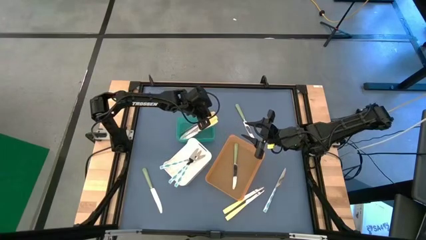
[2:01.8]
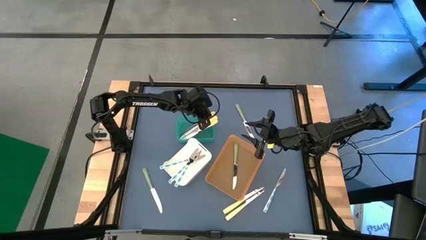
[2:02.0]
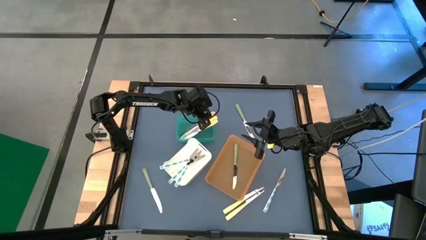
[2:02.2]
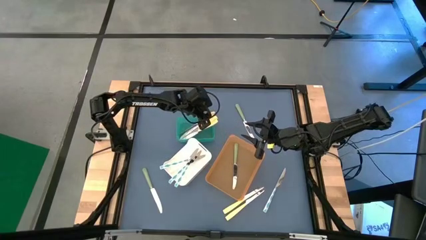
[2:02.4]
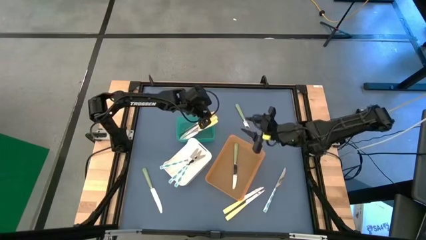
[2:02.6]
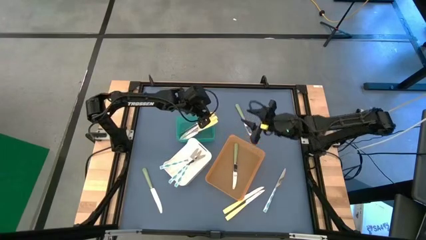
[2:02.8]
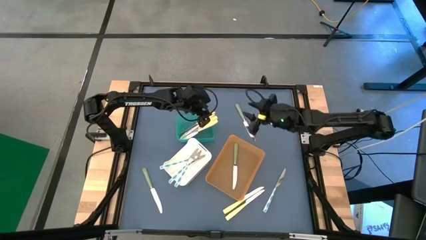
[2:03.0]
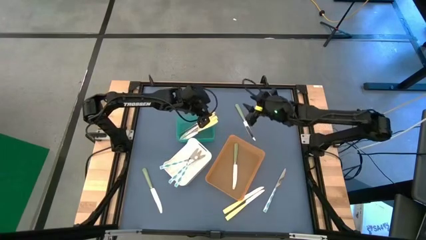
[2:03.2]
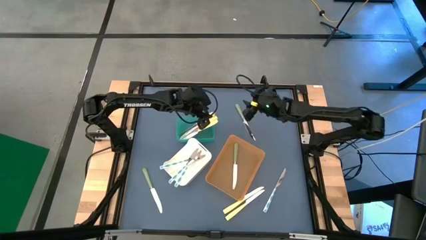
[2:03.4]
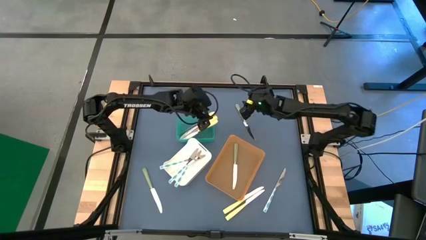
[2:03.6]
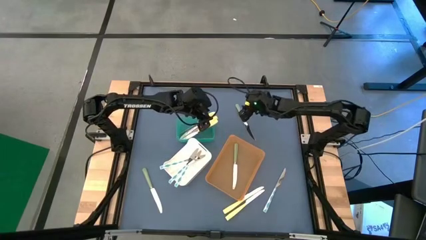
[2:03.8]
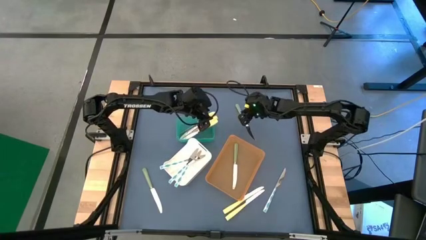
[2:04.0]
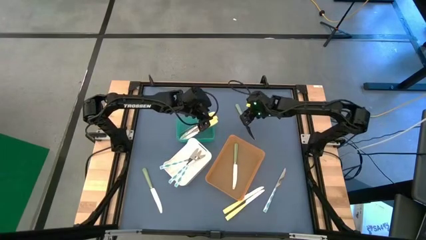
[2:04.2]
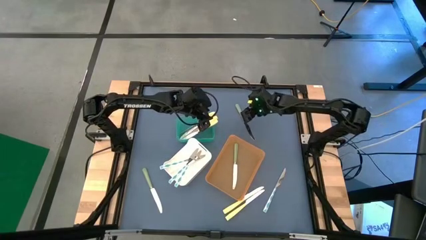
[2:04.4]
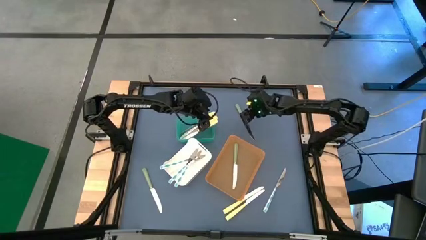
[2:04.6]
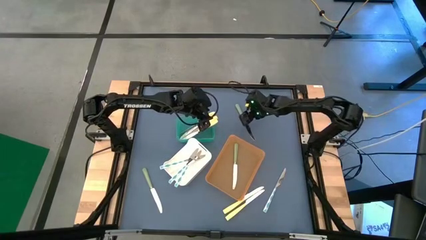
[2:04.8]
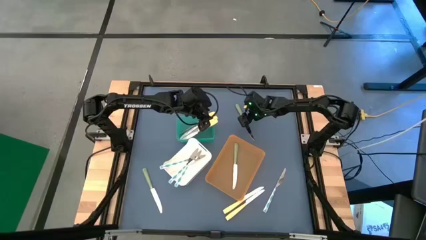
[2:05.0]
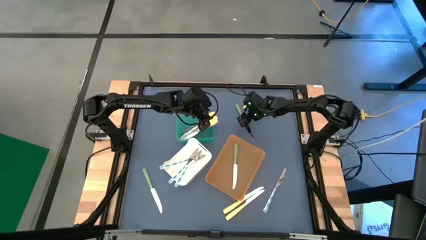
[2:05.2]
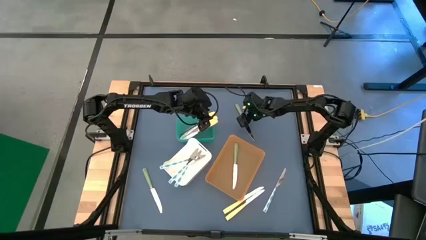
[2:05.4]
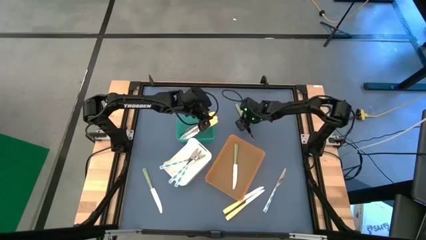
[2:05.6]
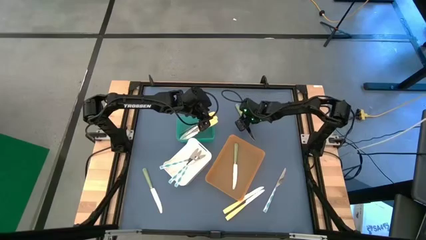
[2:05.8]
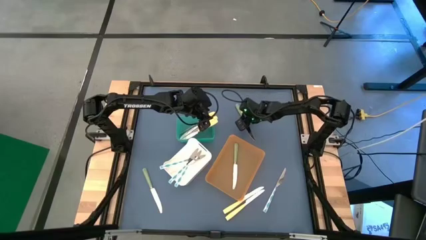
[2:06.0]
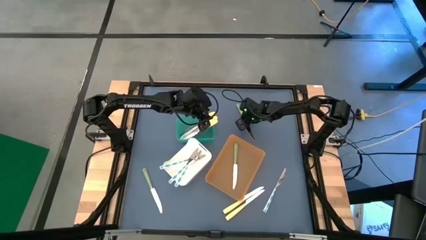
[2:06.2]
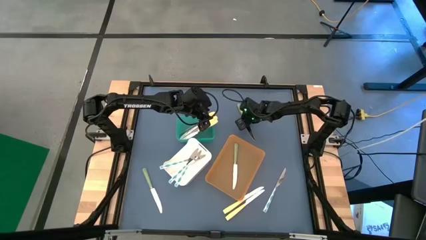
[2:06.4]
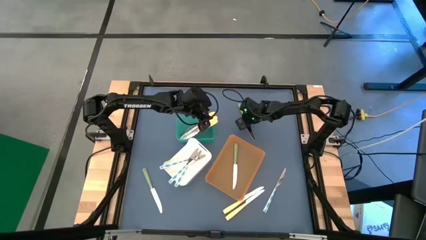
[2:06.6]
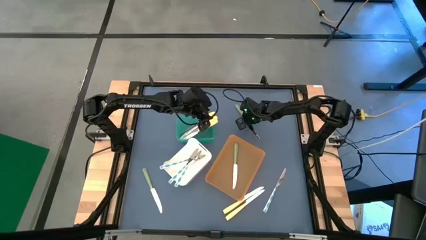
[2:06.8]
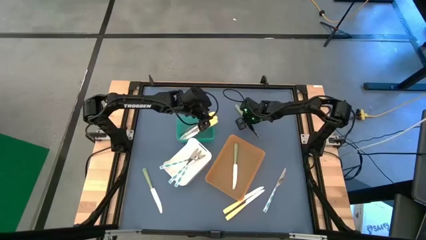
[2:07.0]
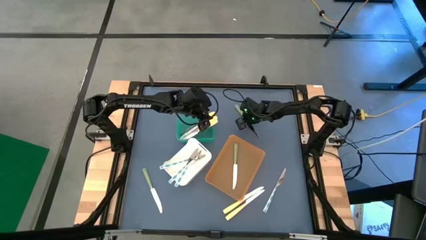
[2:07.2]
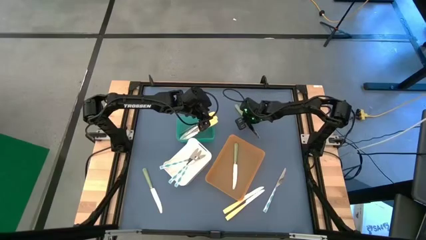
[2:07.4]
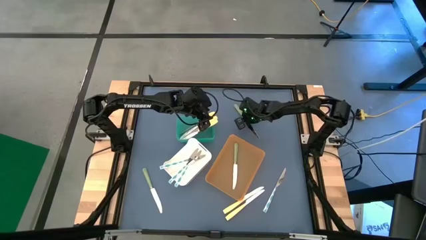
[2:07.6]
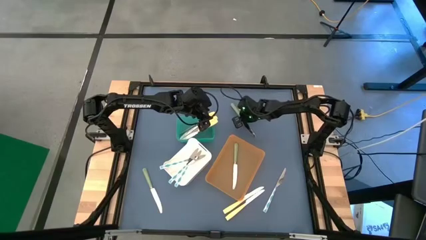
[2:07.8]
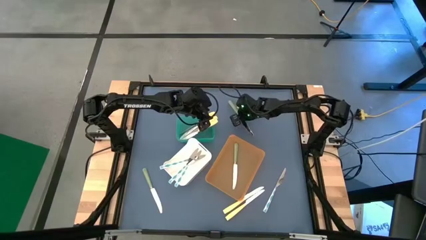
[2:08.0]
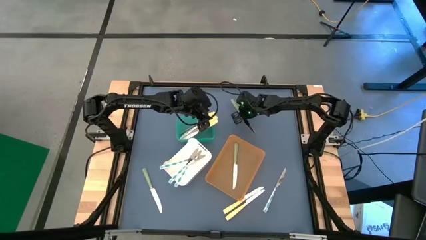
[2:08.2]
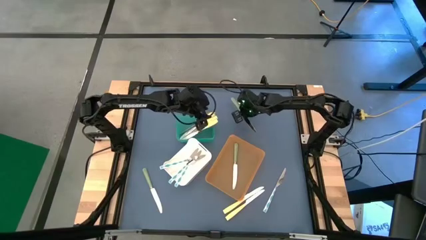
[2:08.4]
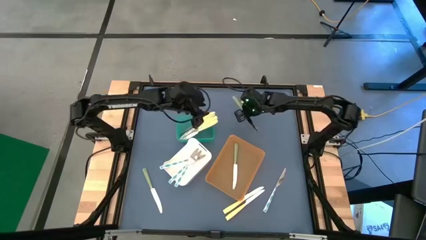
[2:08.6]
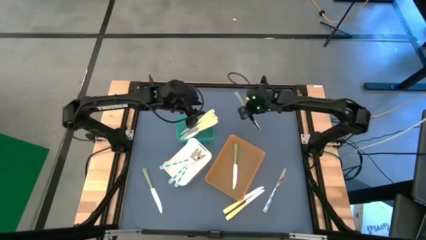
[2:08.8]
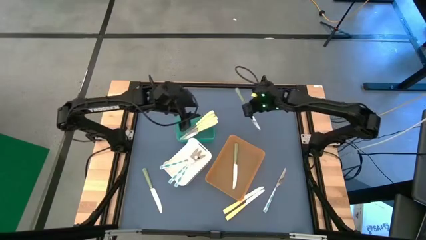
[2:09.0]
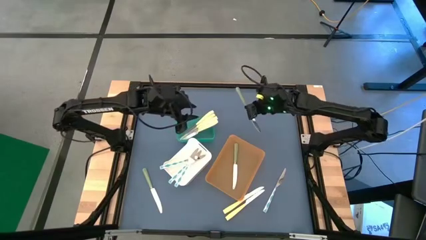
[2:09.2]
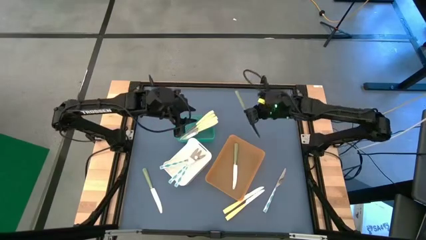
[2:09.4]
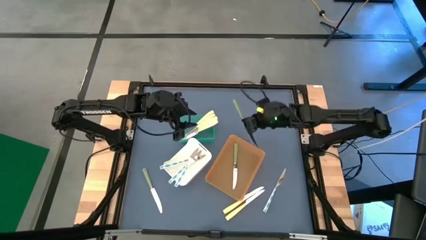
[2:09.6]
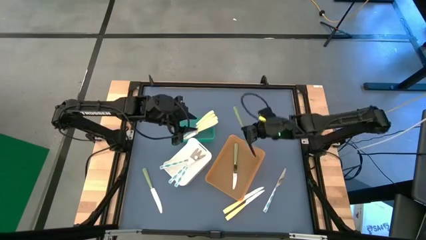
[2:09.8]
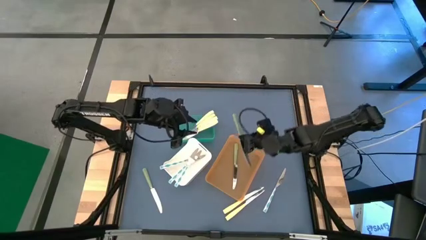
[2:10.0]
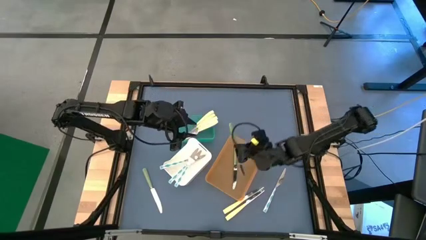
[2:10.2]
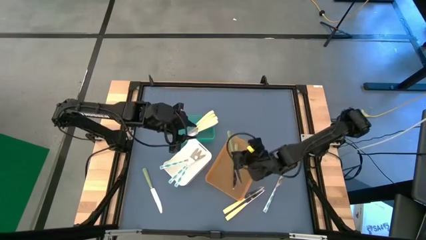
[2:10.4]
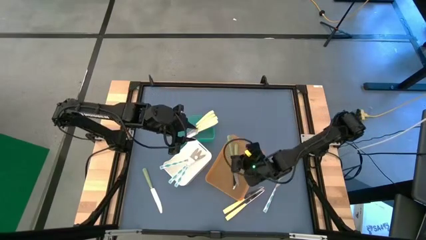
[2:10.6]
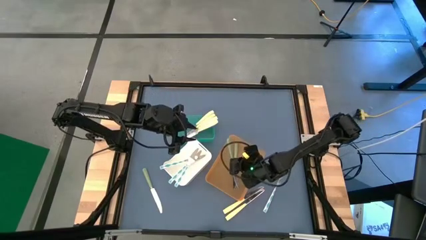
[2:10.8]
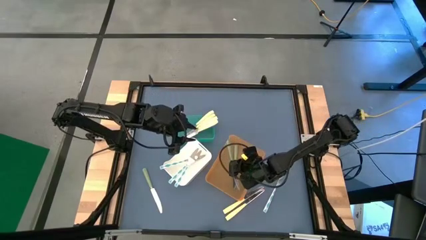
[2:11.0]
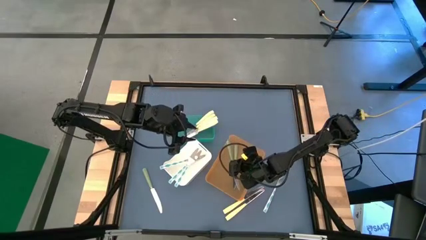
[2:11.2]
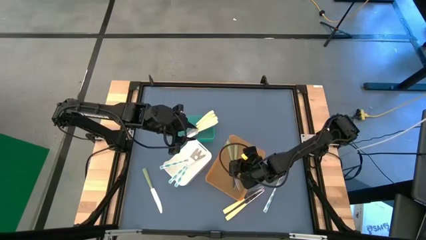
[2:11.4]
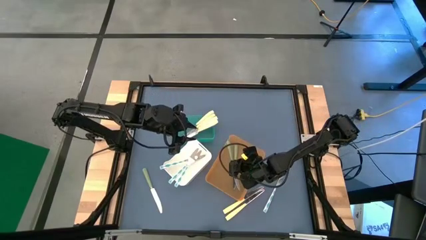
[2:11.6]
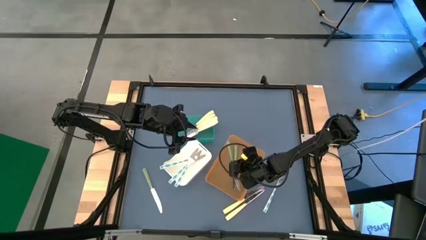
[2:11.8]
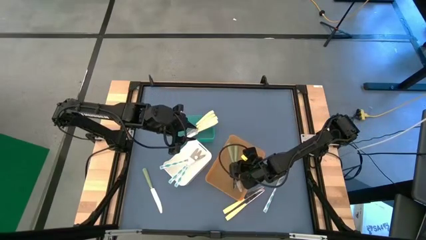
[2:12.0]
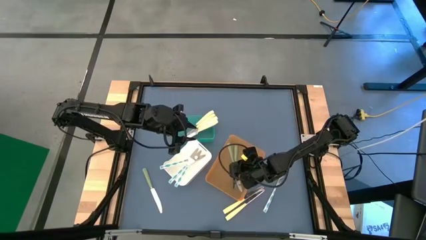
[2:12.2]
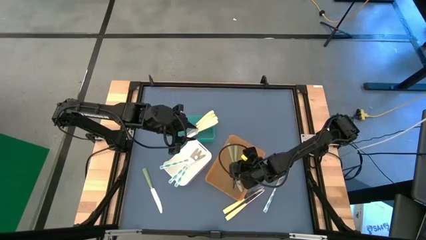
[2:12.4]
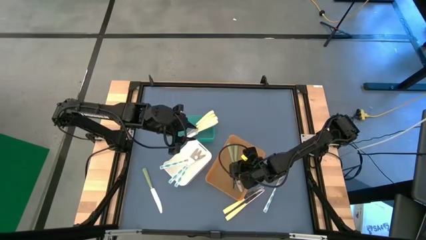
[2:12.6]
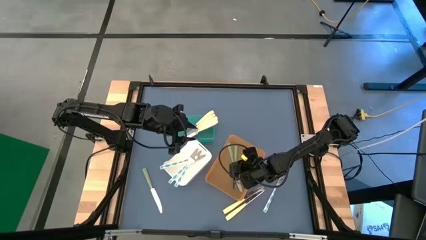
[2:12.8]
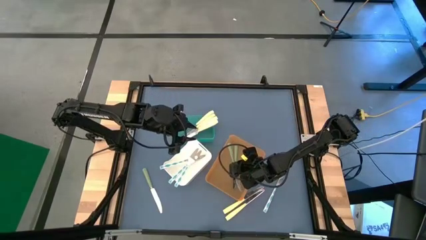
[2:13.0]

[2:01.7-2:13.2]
Task: Sort silverware by color (type)
Put the green knife into the orange bin
